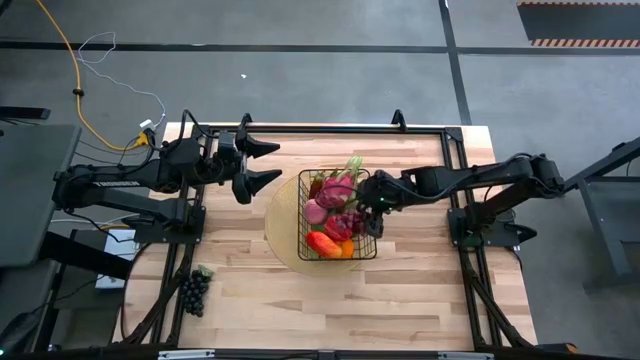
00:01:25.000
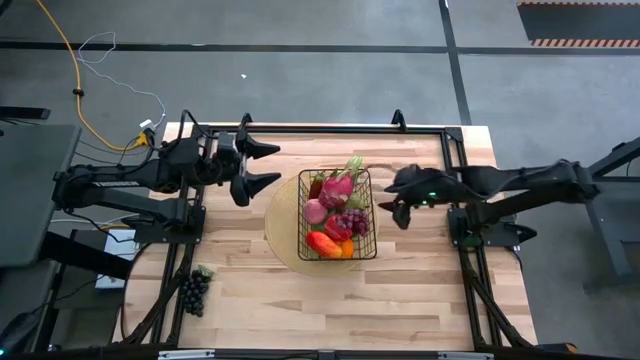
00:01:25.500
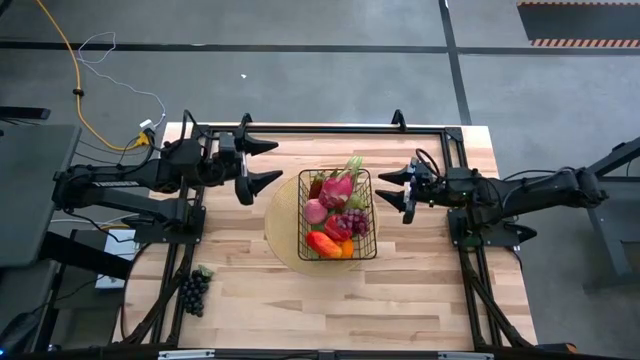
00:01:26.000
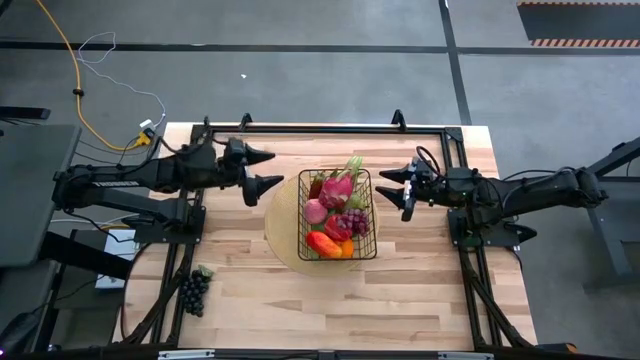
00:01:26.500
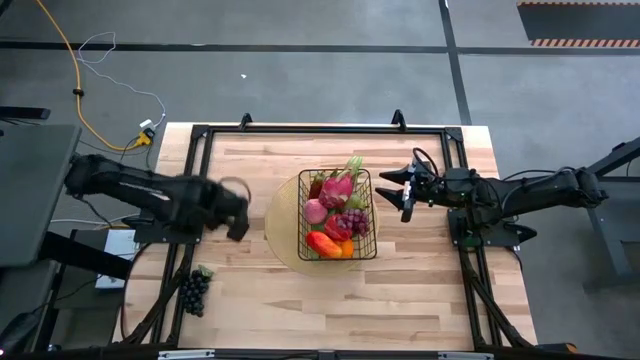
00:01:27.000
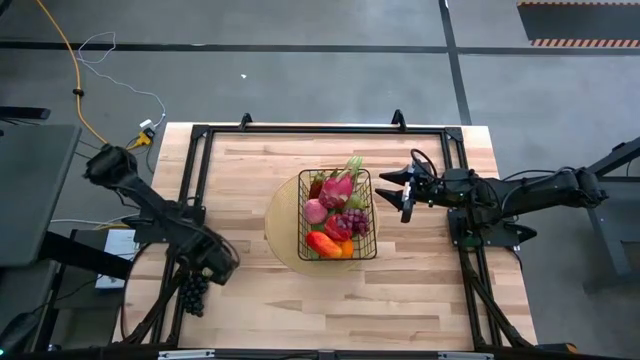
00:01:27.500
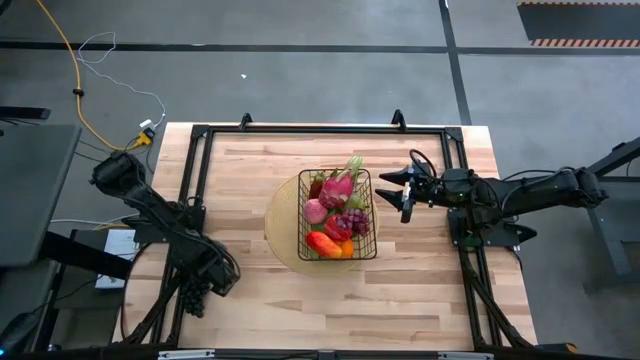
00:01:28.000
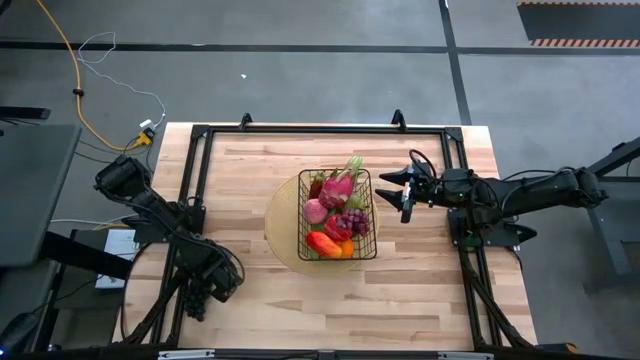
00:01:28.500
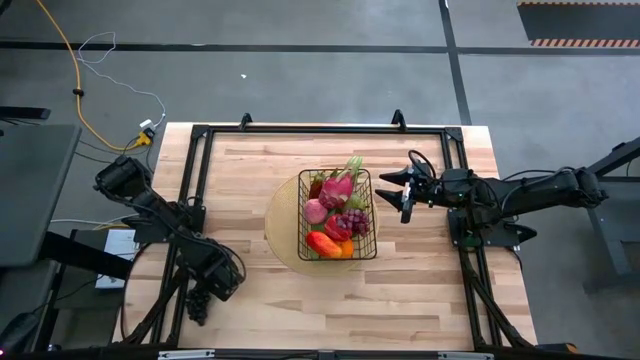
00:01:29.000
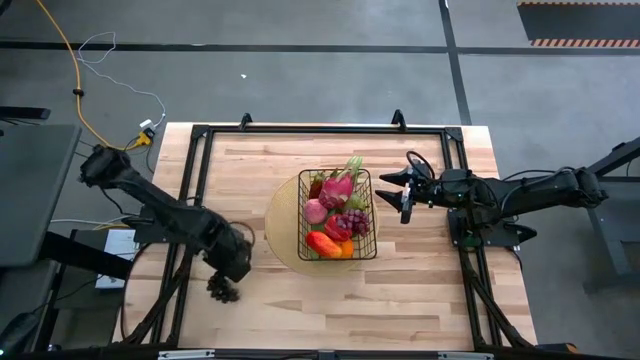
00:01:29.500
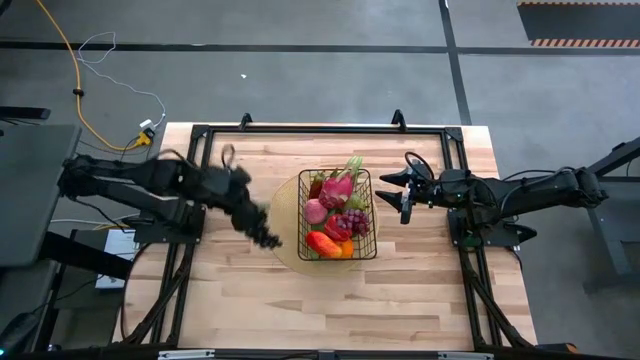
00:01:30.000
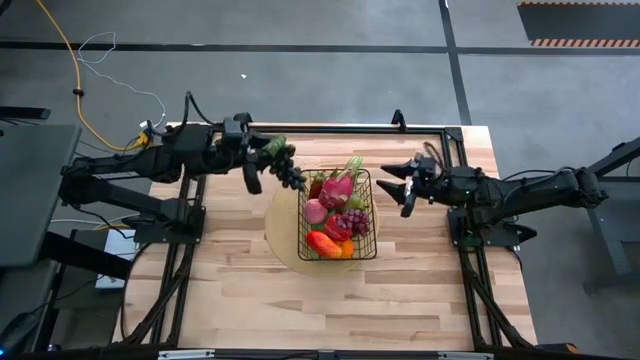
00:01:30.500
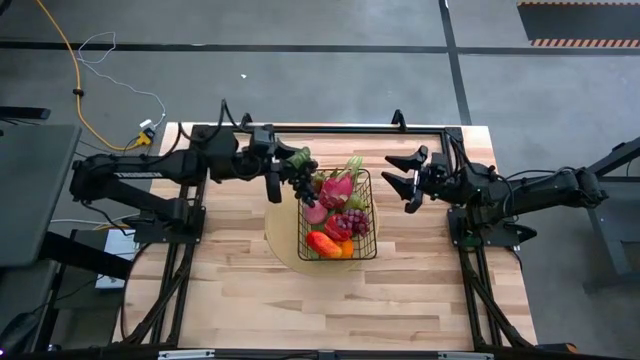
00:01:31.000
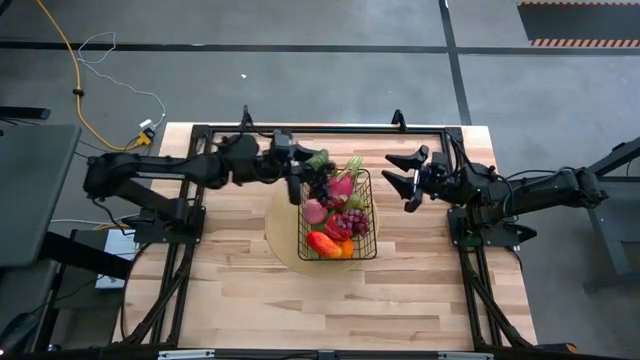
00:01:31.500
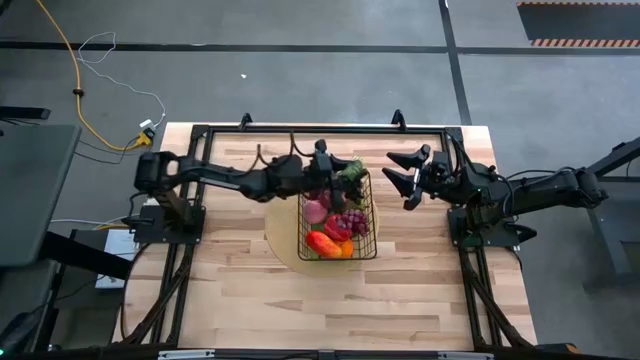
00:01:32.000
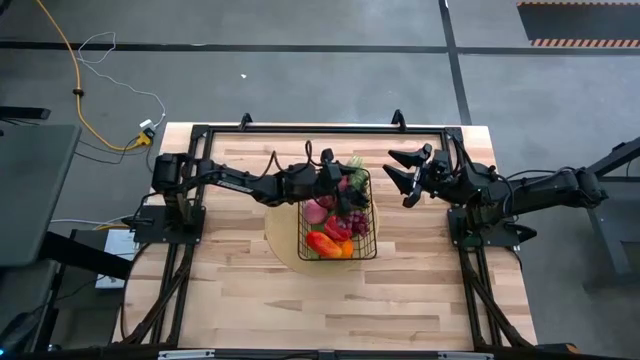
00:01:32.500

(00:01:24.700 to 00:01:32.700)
Task: Build produce basket
Put the grapes into the wire basket

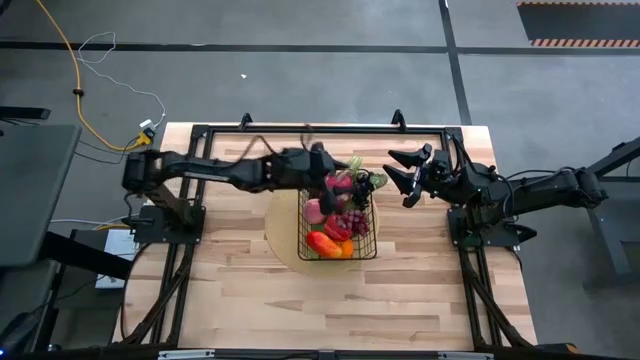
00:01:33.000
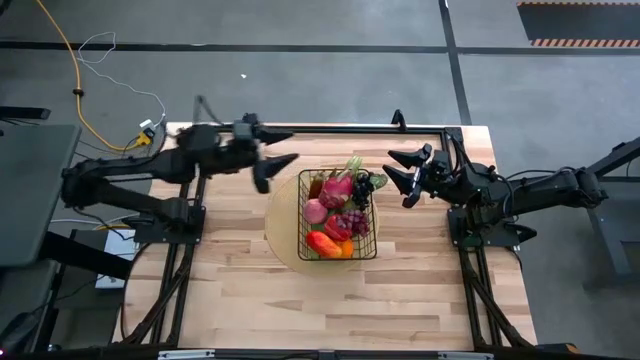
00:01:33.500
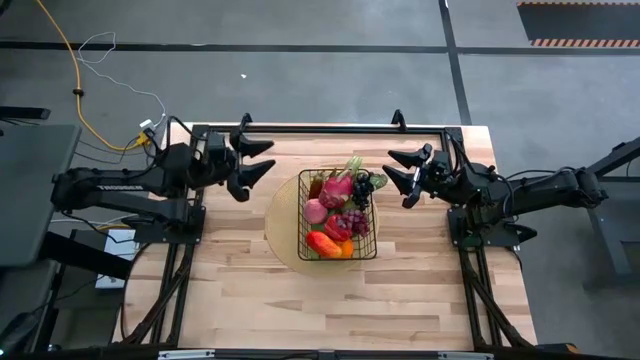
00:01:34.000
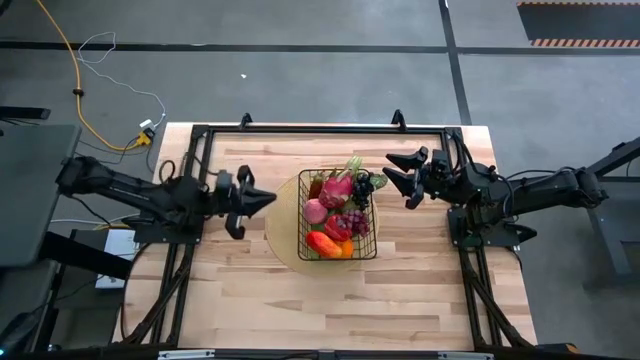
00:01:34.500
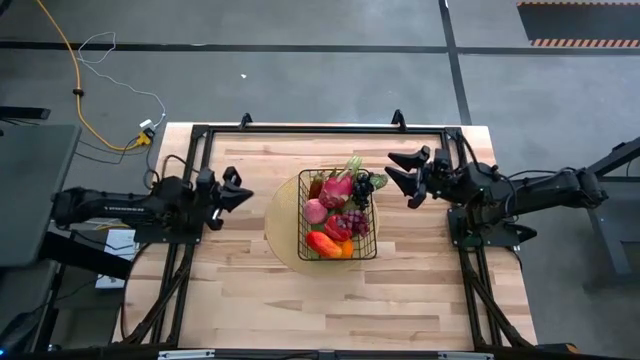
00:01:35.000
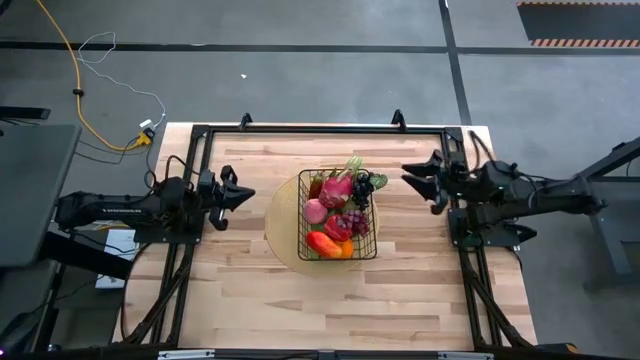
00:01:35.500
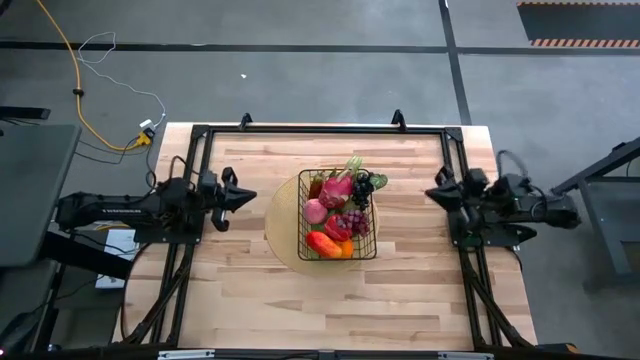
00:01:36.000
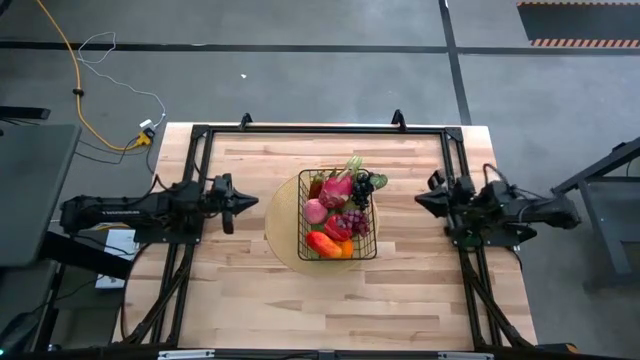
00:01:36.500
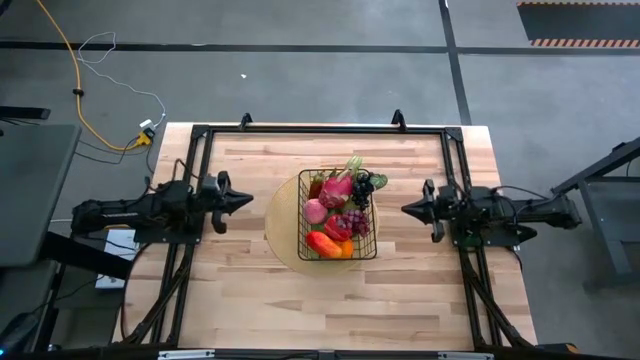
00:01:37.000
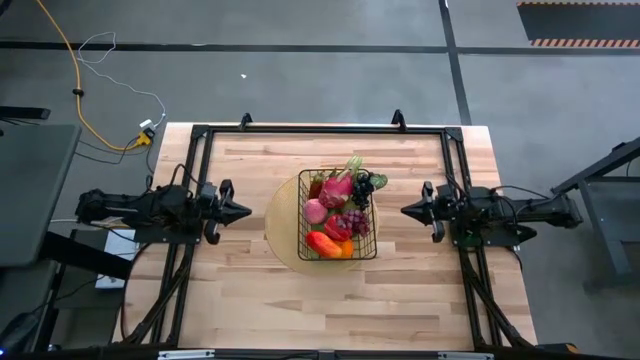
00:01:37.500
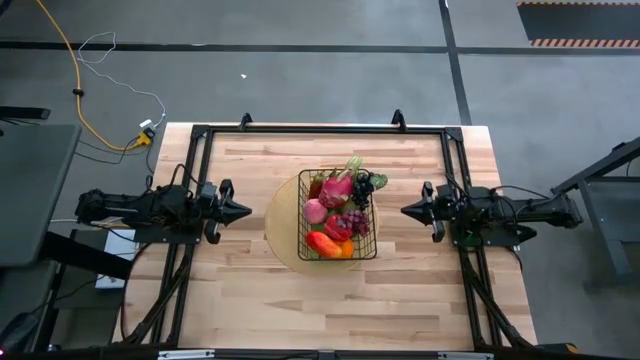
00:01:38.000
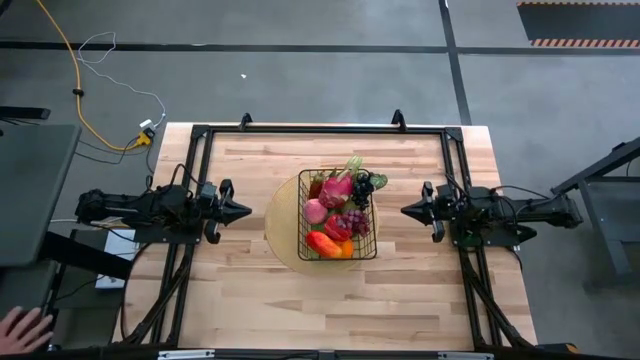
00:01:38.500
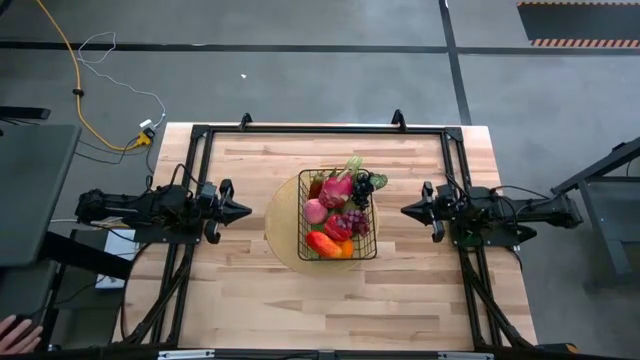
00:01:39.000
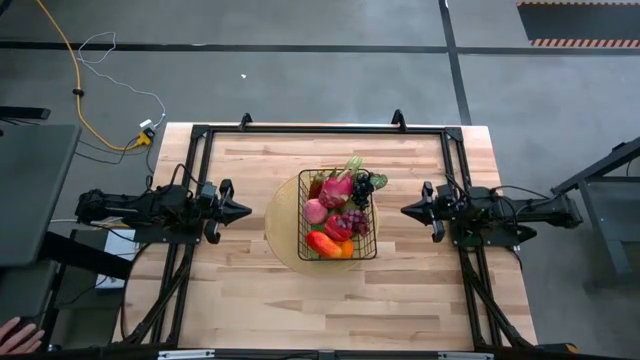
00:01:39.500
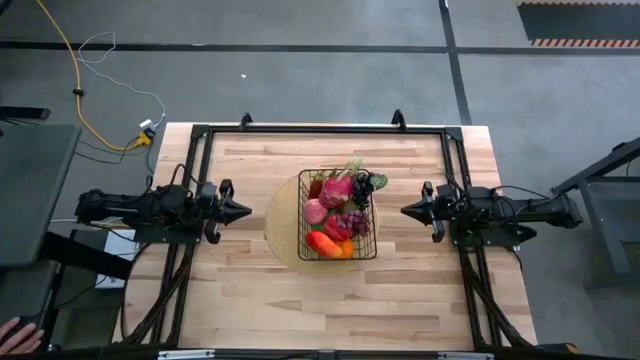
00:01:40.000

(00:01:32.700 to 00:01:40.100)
Return to Home Position

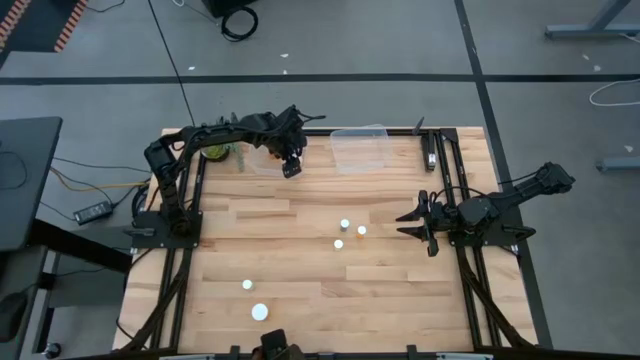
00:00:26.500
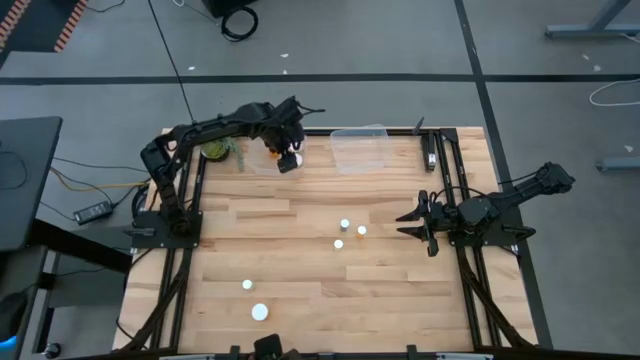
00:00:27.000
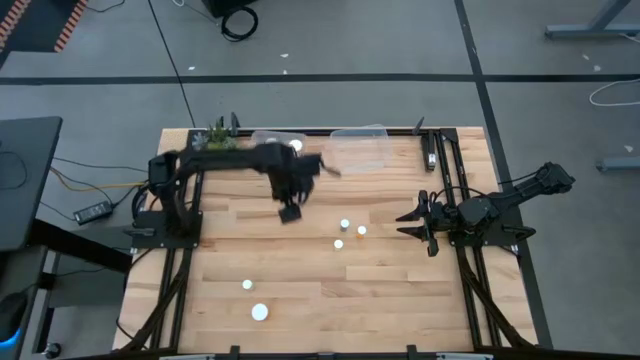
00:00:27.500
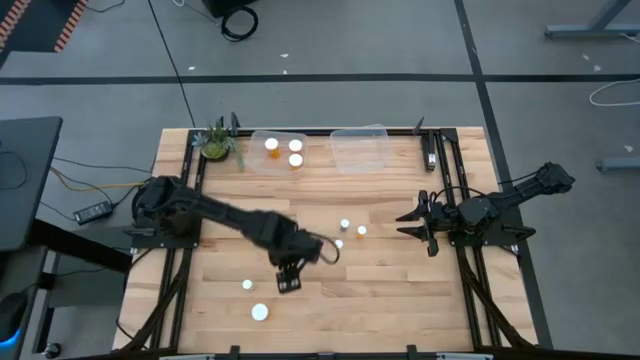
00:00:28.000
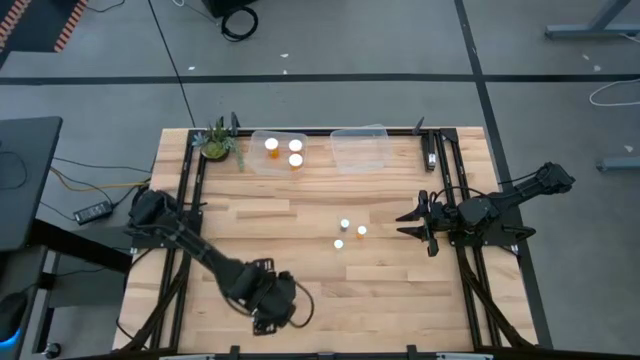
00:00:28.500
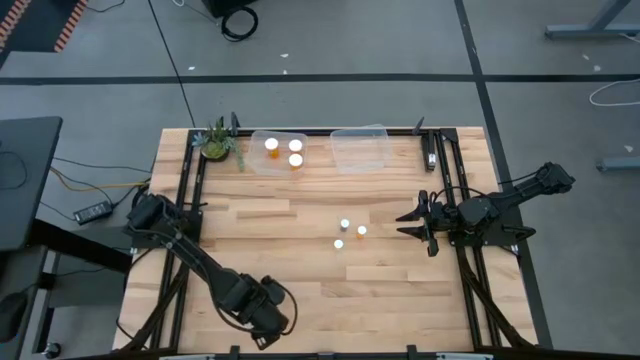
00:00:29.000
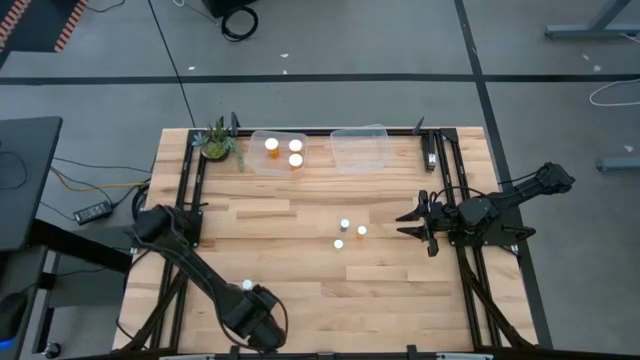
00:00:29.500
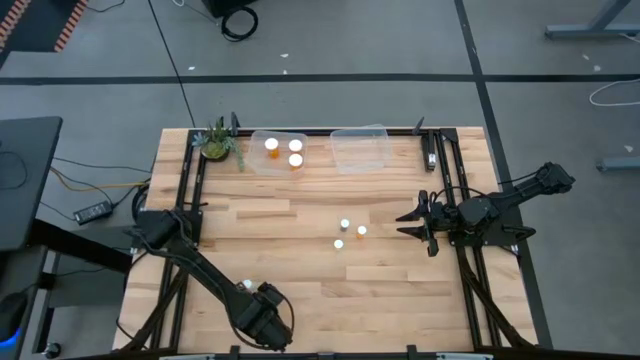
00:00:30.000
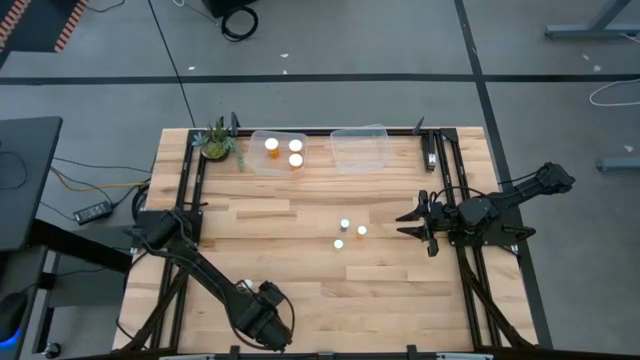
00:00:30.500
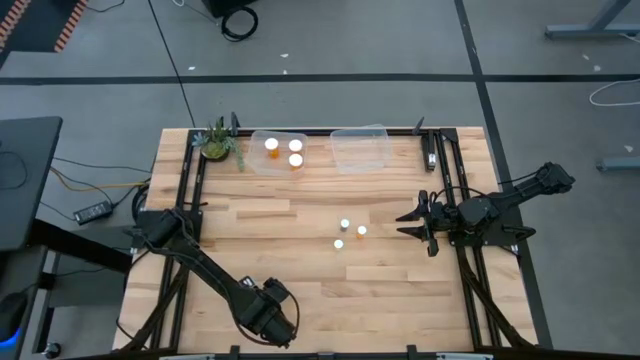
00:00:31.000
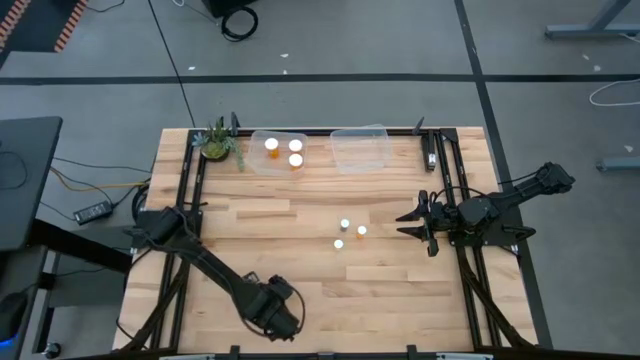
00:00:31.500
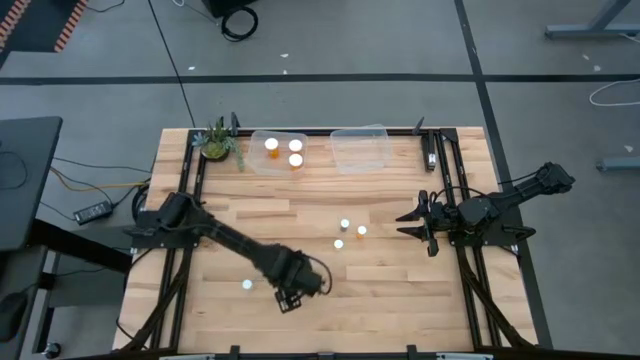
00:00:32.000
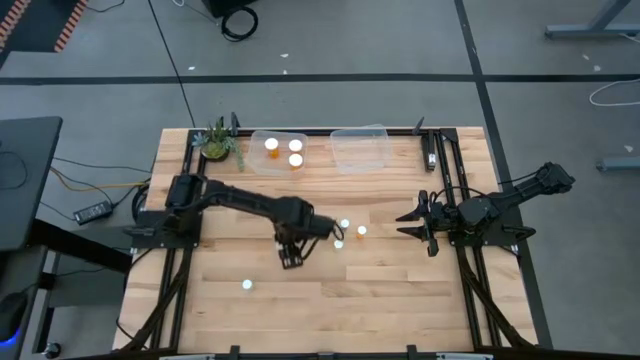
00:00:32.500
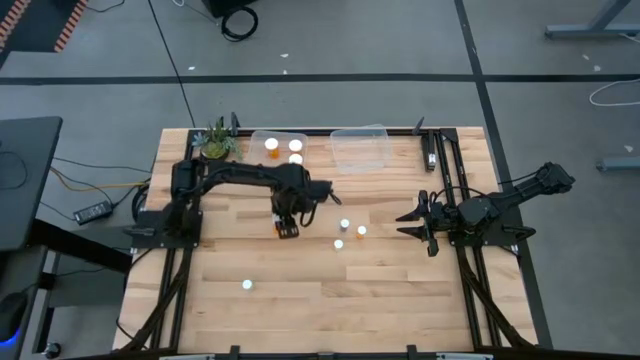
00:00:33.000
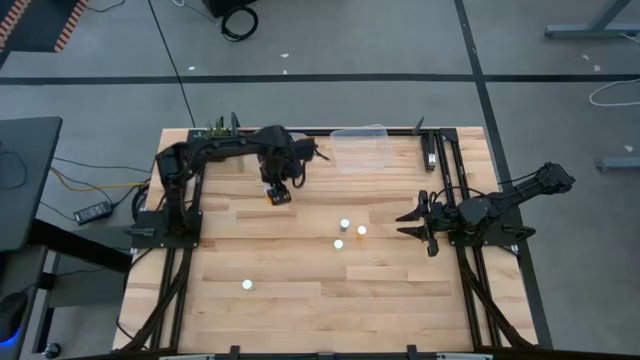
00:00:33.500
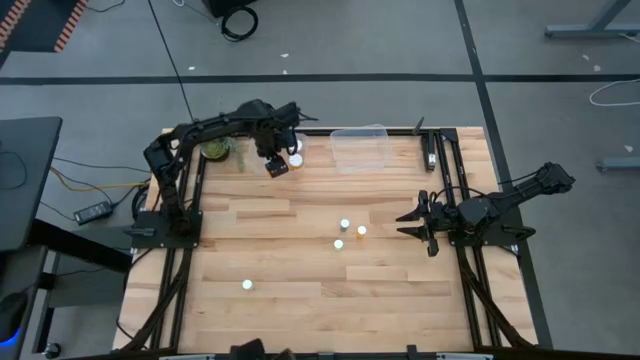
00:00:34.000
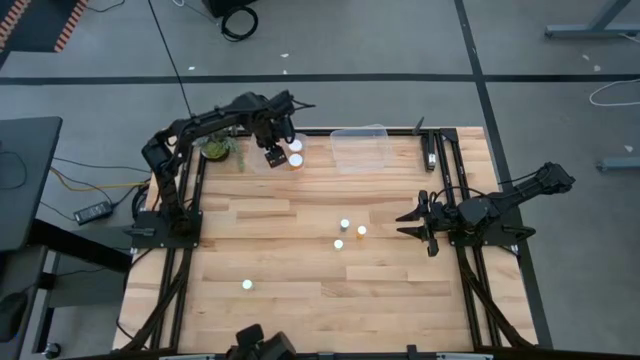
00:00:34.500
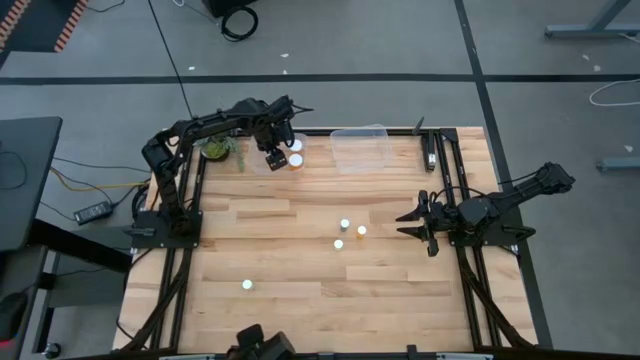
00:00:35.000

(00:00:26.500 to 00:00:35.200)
Task: Pick and place medicine bottles into bin by pill shape (circle, oval)
Put the large orange pill bottle into the left bin
